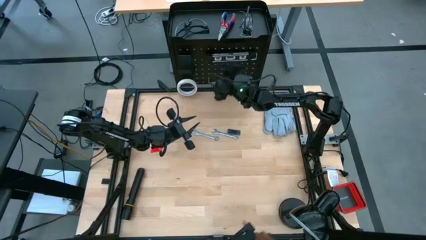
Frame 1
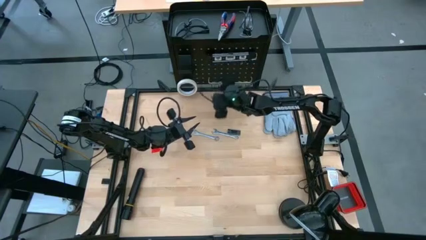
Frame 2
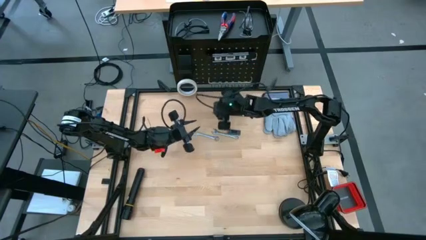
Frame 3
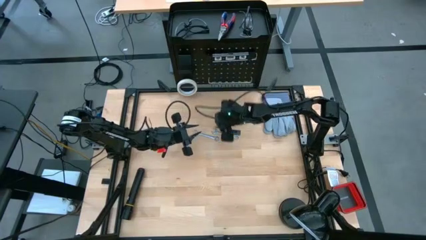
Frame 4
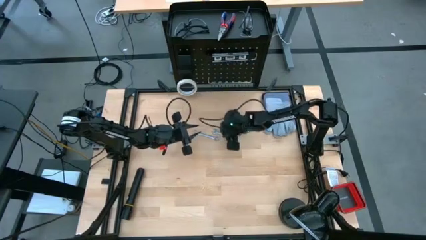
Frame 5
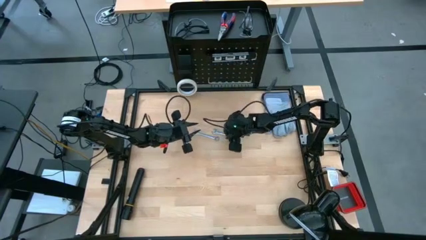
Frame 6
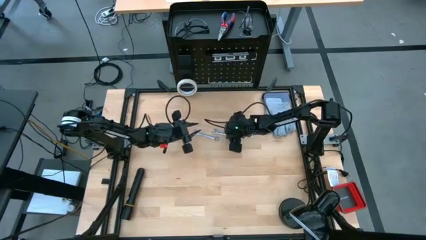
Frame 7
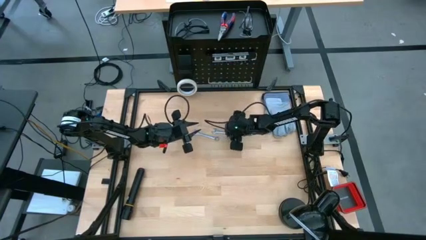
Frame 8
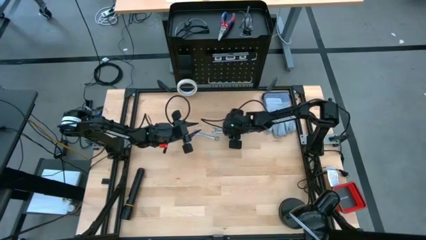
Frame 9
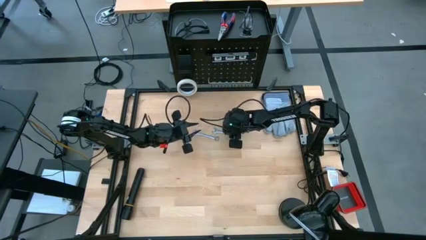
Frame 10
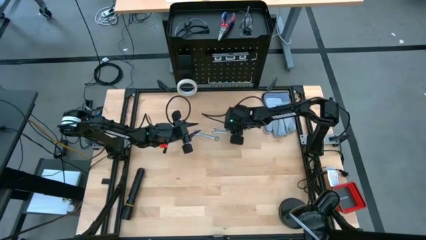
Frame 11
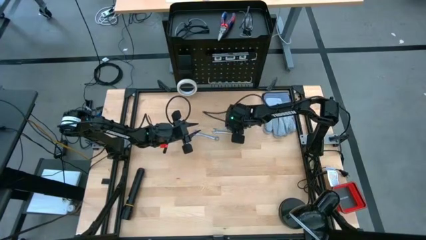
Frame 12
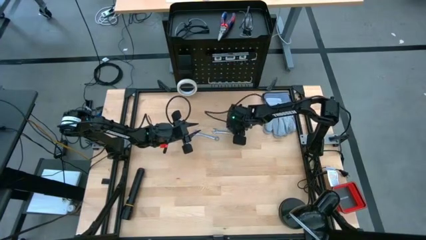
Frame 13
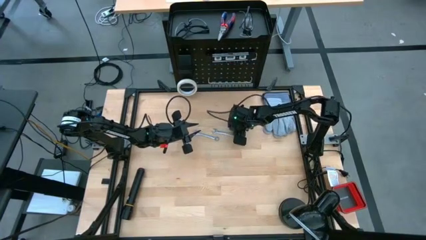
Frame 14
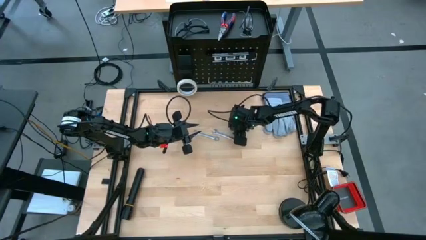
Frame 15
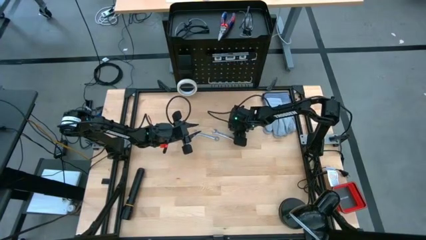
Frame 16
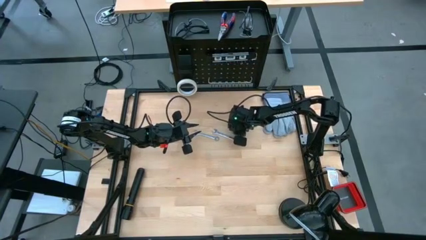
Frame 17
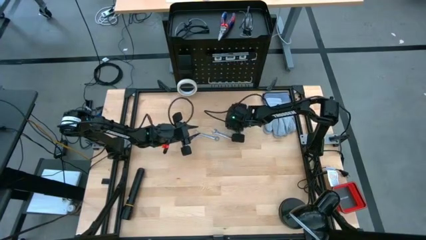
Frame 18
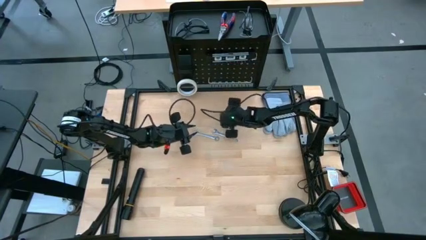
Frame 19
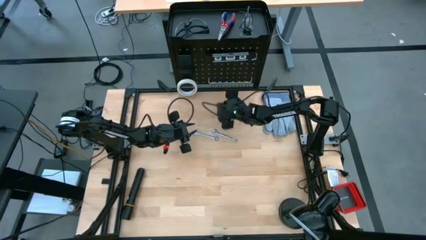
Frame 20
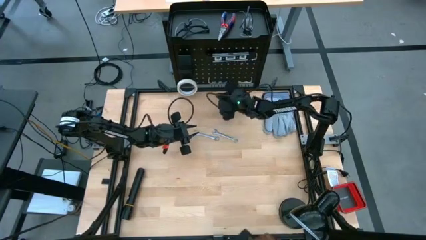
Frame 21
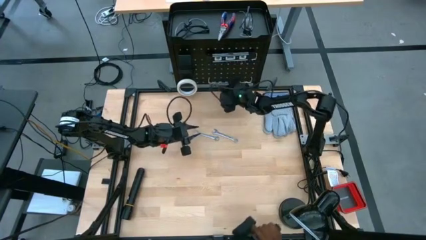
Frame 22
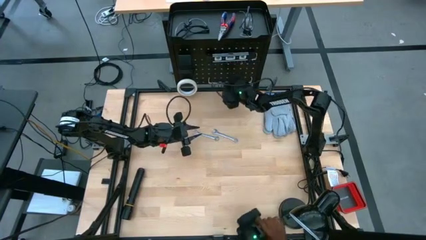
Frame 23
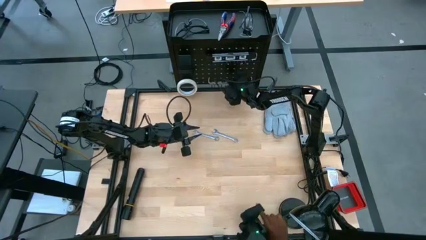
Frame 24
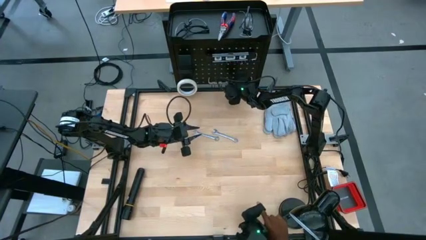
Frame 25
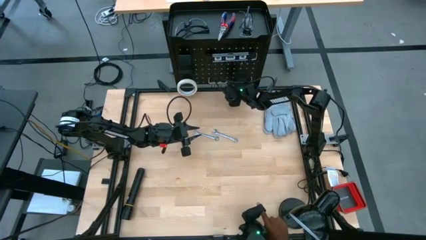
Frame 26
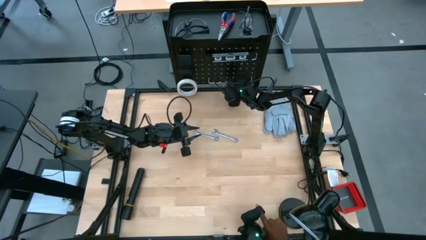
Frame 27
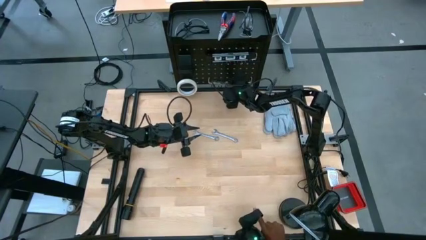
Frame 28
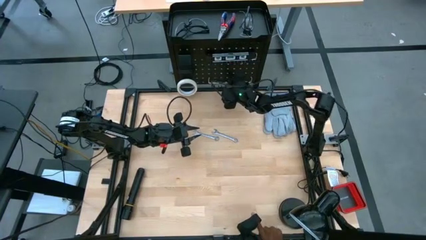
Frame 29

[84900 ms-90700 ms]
Task: Hang tools onto peg board
Put the black frame leveler on the black pegboard

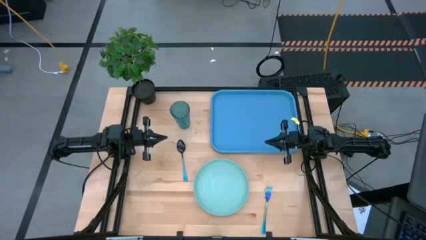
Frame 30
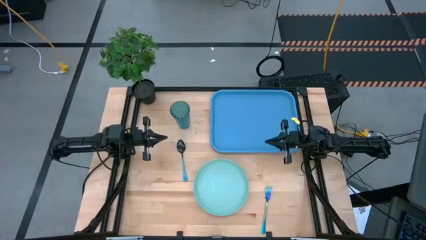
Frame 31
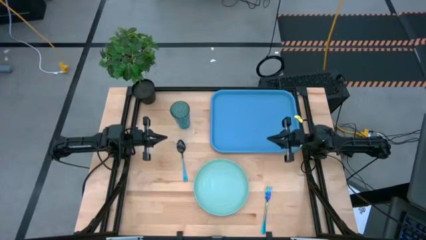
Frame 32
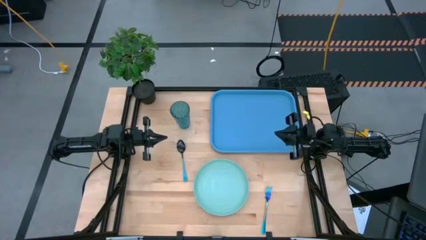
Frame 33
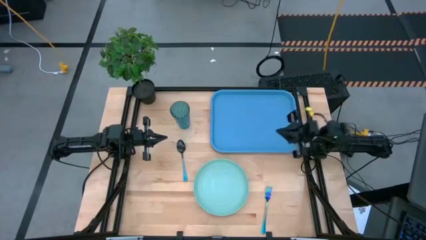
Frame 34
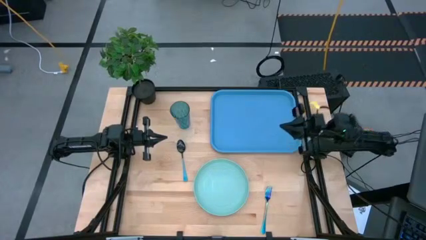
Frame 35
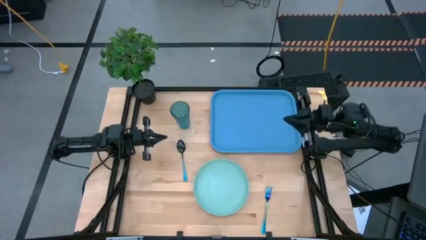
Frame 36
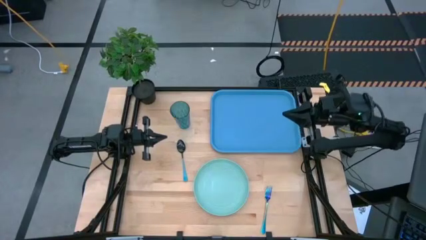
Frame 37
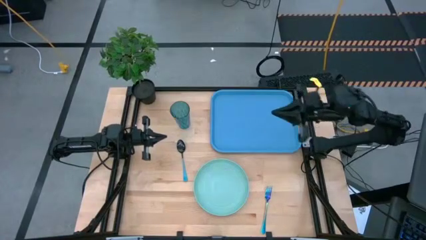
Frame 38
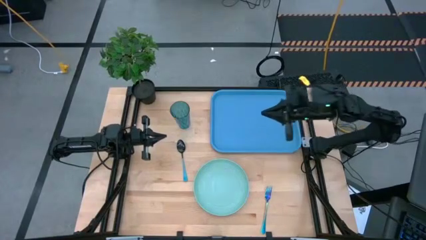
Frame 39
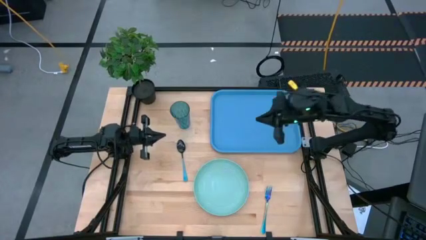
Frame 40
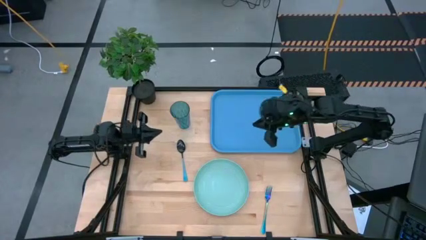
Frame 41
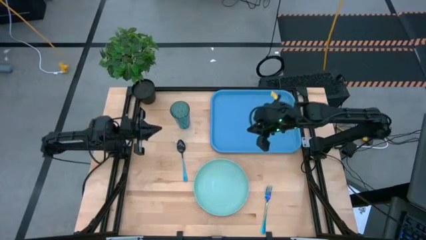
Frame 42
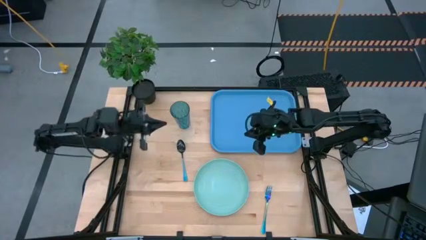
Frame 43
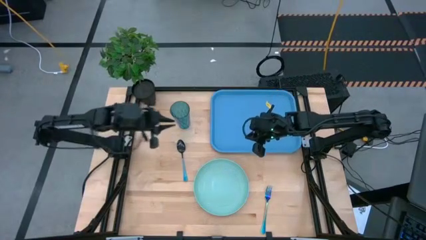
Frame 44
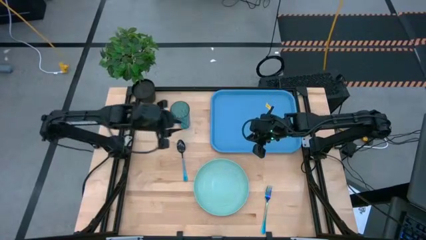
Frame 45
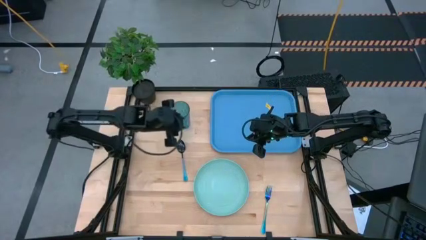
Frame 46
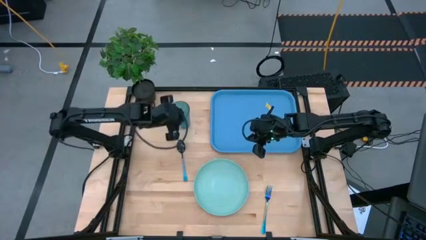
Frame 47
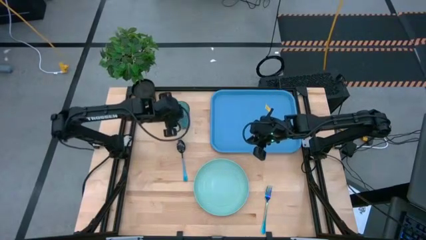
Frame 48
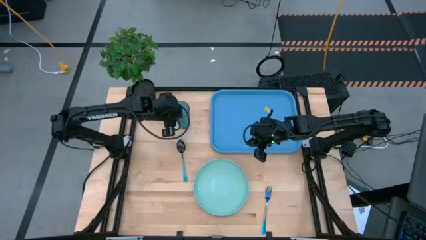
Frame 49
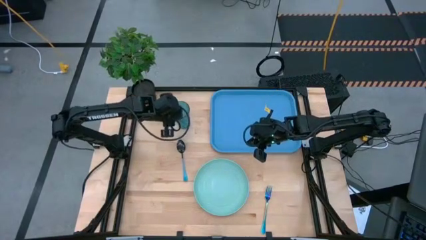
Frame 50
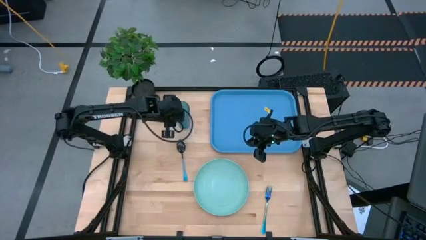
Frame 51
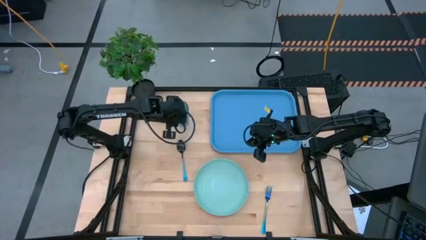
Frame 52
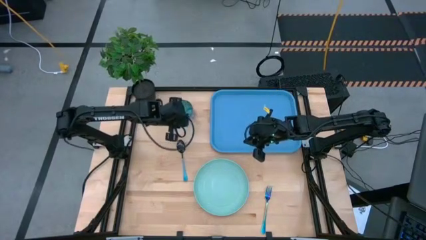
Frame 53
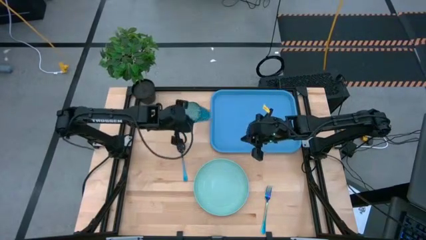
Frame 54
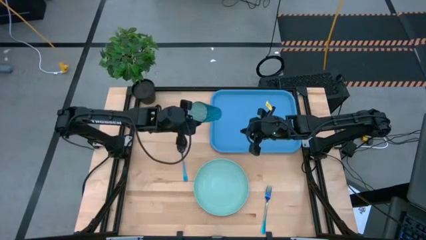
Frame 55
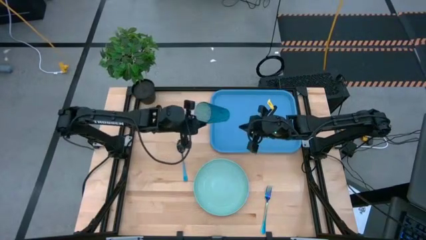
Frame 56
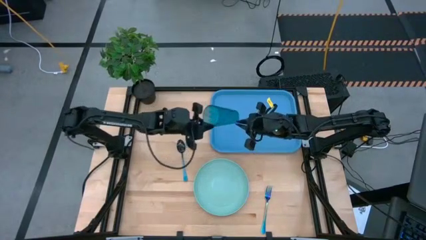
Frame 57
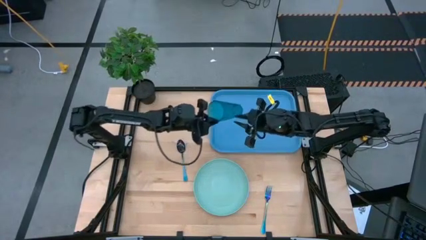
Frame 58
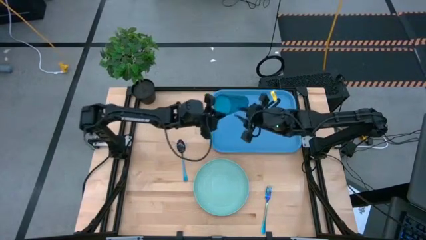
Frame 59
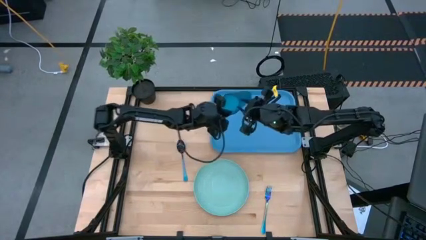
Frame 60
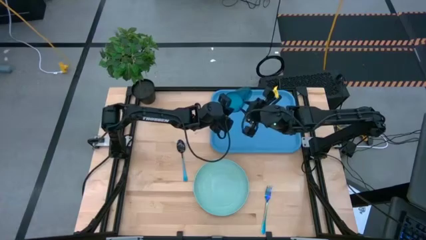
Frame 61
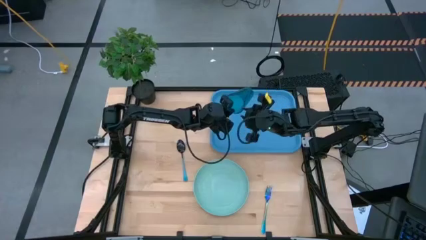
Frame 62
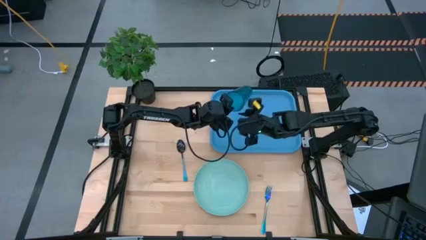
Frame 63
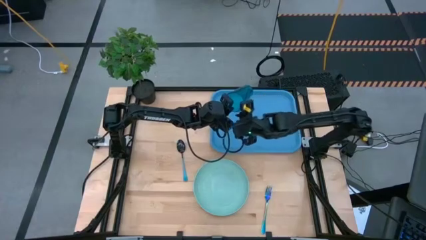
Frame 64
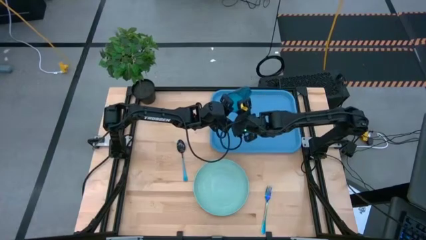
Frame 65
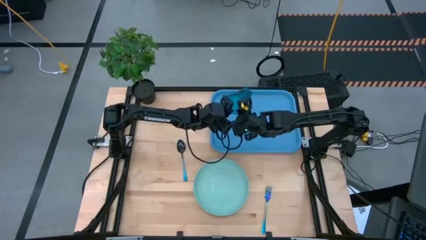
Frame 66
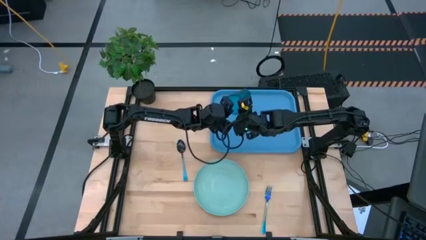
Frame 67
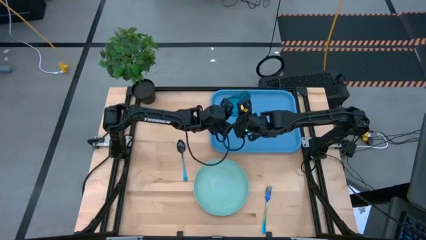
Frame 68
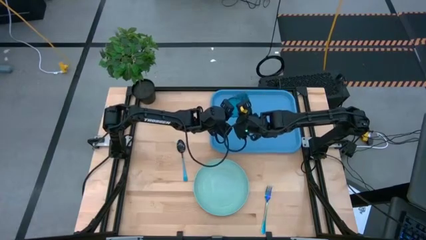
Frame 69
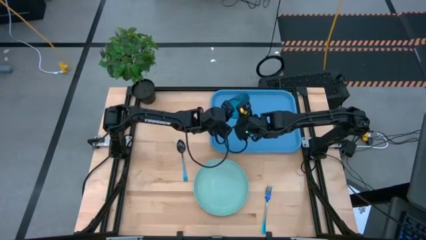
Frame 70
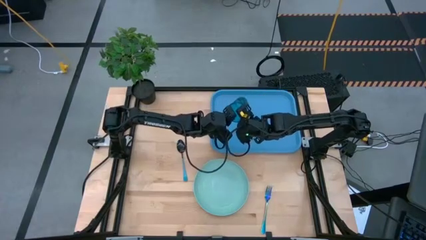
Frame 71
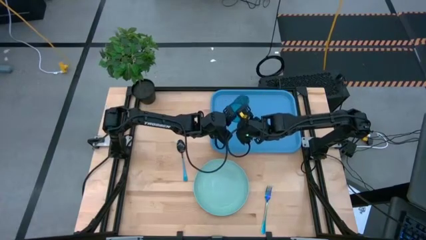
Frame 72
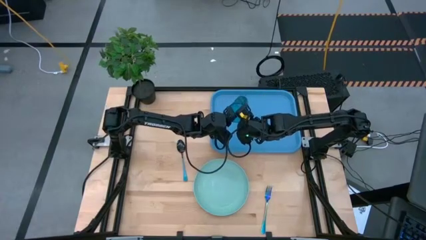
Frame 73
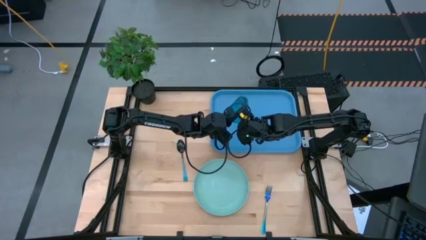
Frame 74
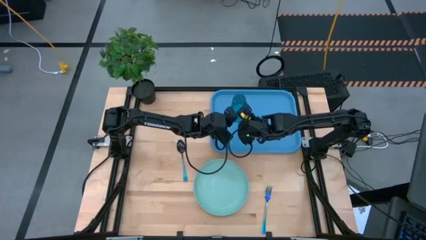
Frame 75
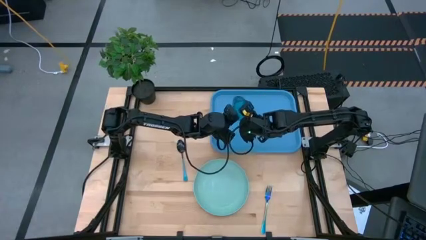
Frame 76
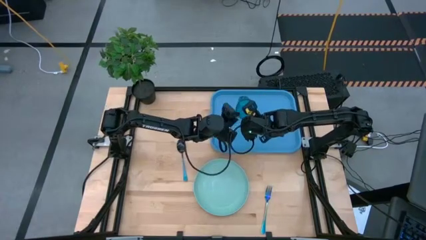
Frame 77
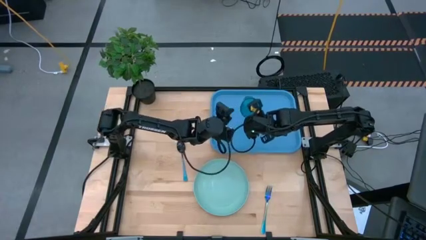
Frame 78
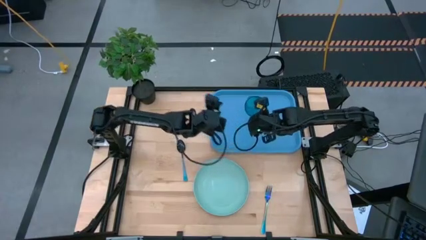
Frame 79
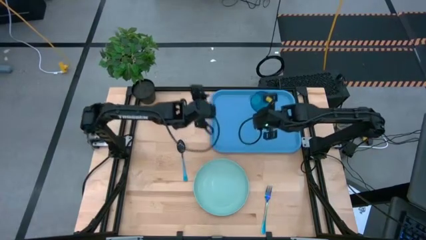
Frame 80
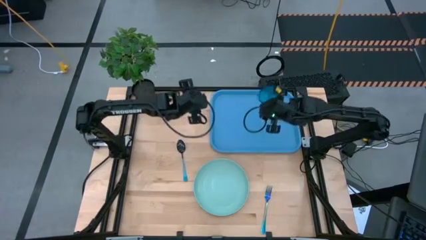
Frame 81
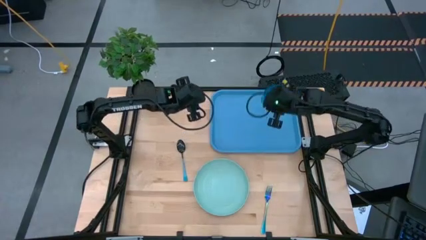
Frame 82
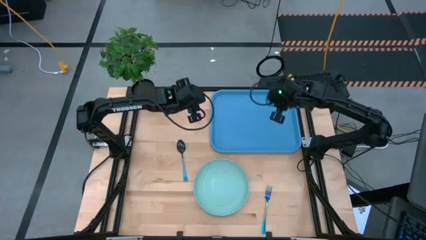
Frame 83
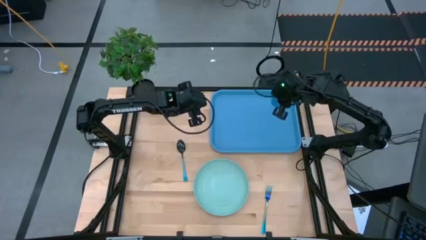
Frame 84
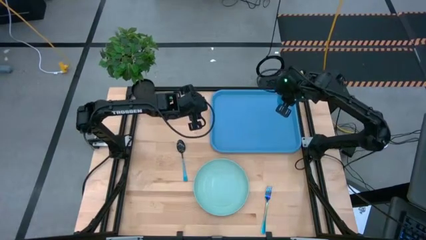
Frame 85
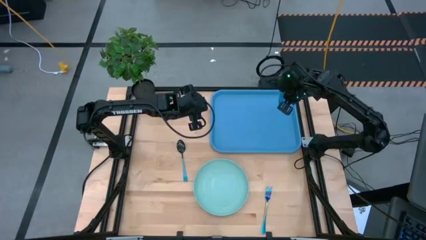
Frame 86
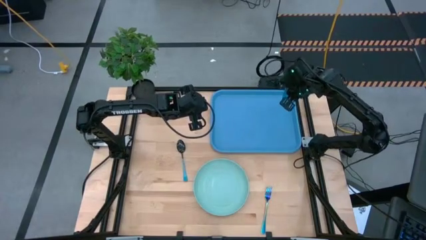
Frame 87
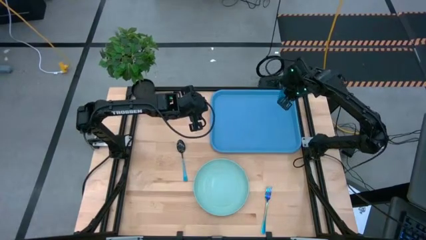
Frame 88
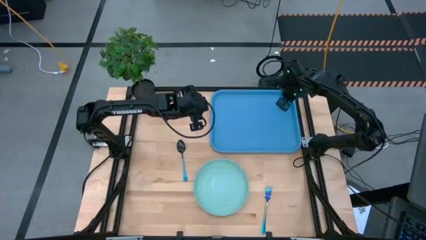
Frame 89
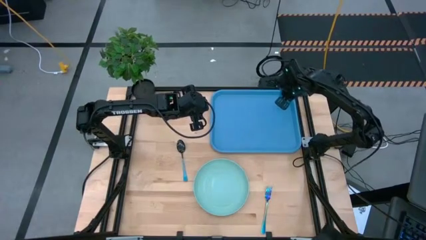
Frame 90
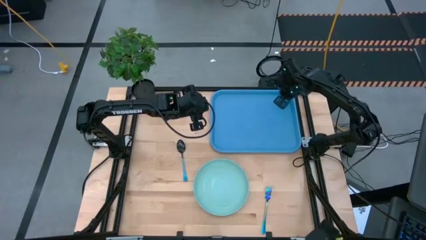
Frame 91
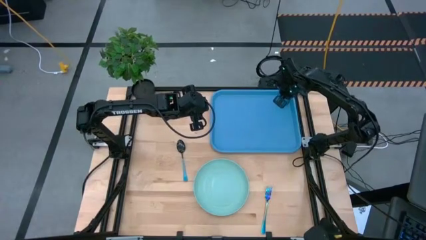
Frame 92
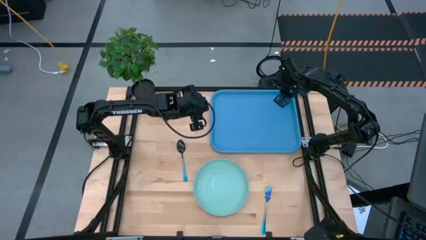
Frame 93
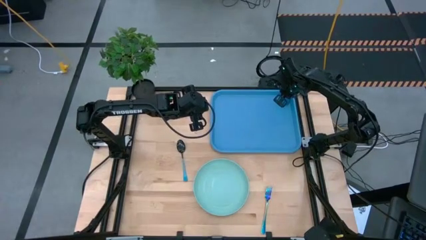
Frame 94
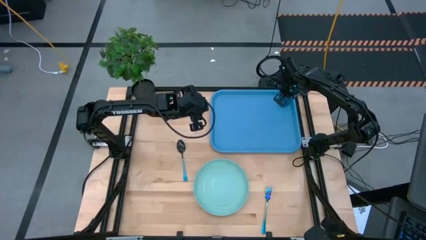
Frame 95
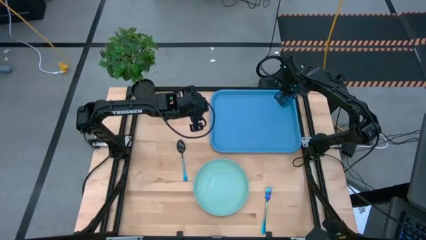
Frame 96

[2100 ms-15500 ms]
Task: Pick and place plate/cup/fork/spoon on tray
Put the blue glass in the top right corner of the blue serving tray
